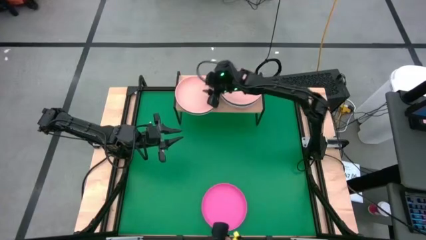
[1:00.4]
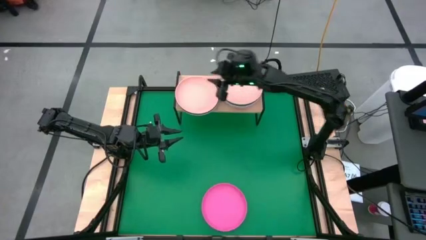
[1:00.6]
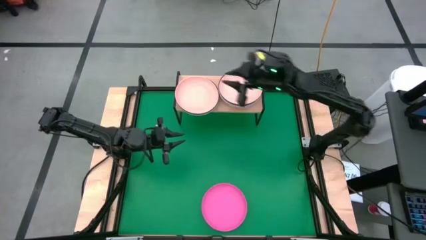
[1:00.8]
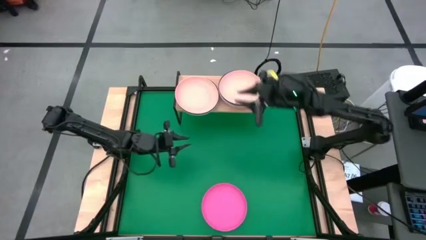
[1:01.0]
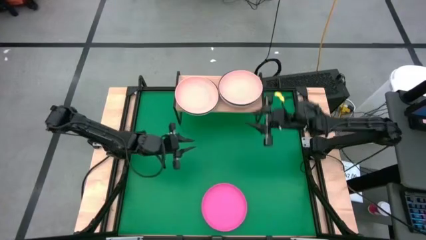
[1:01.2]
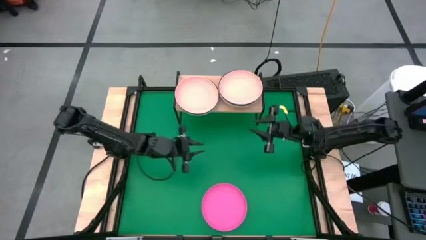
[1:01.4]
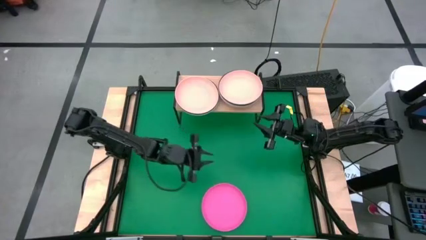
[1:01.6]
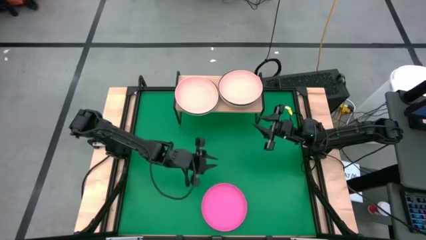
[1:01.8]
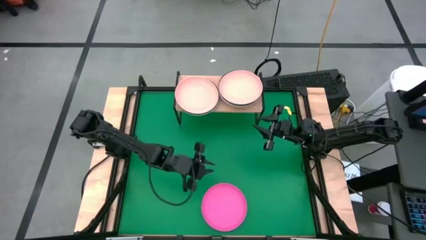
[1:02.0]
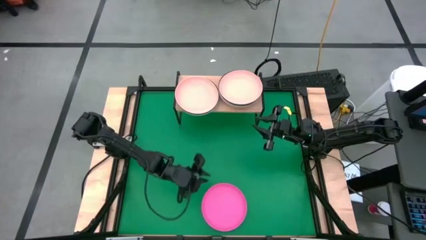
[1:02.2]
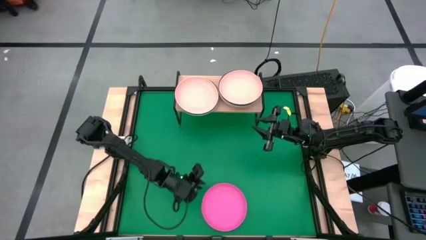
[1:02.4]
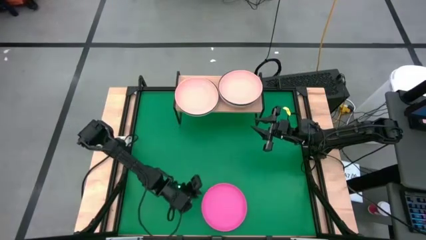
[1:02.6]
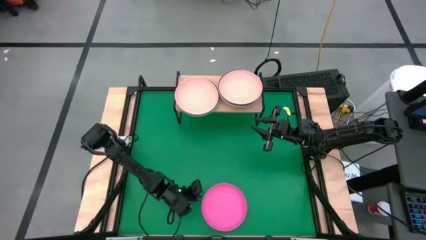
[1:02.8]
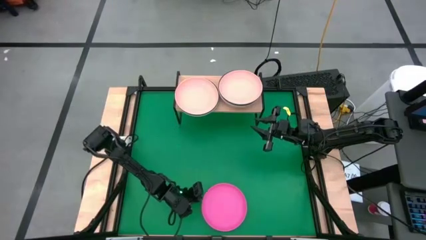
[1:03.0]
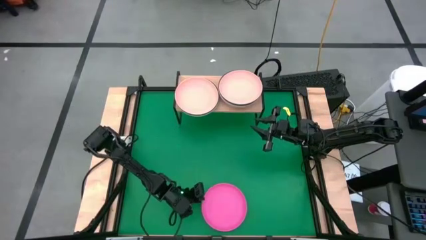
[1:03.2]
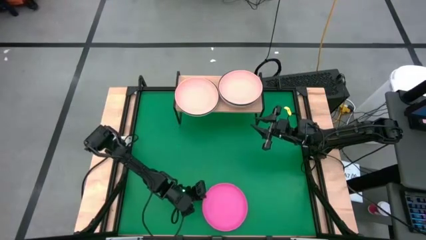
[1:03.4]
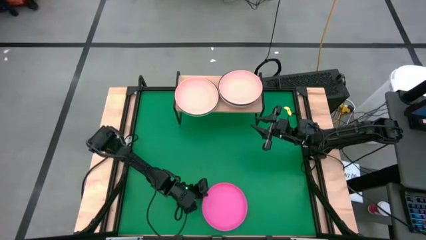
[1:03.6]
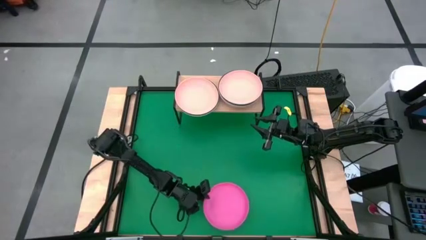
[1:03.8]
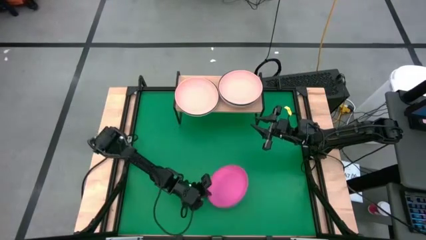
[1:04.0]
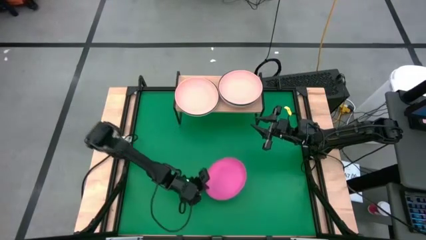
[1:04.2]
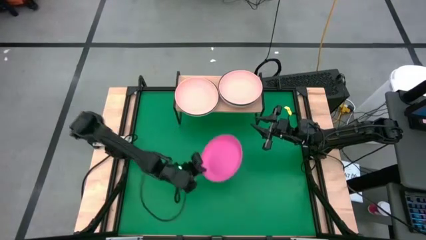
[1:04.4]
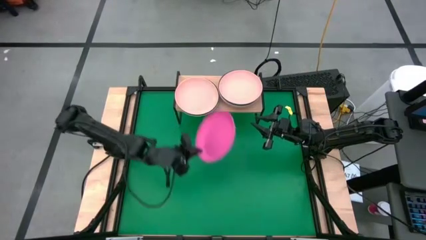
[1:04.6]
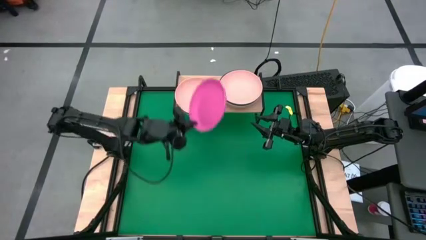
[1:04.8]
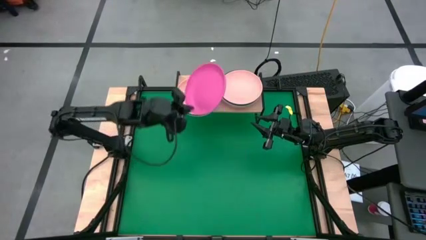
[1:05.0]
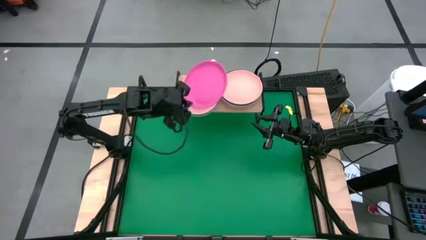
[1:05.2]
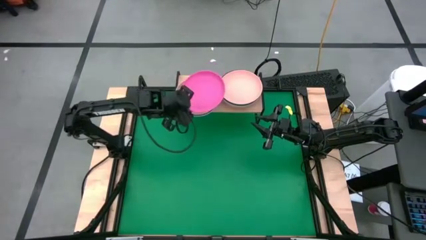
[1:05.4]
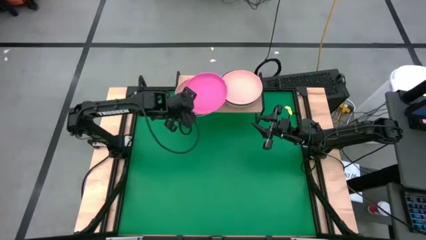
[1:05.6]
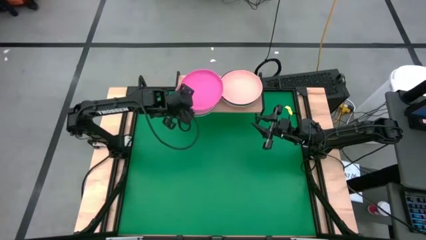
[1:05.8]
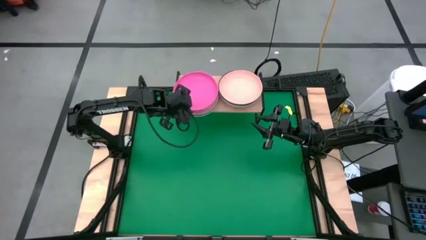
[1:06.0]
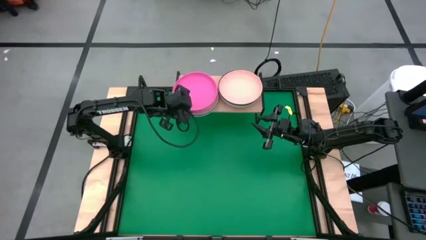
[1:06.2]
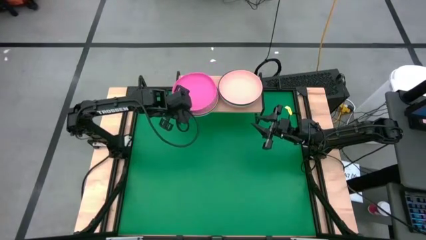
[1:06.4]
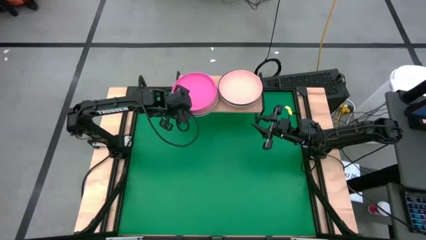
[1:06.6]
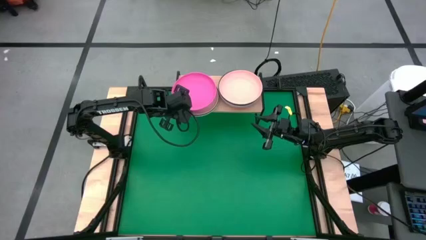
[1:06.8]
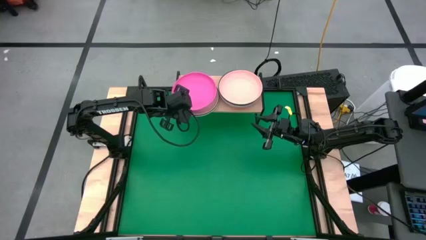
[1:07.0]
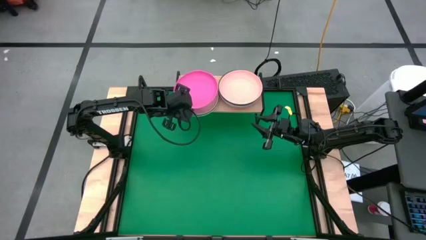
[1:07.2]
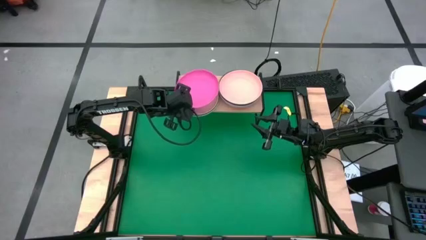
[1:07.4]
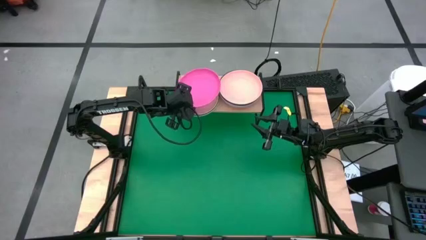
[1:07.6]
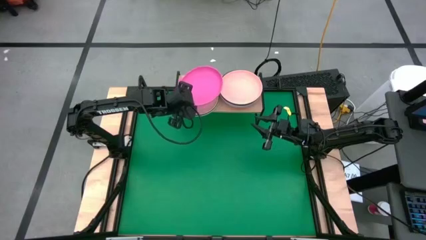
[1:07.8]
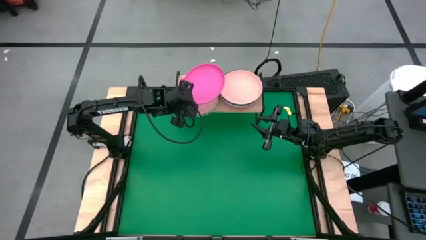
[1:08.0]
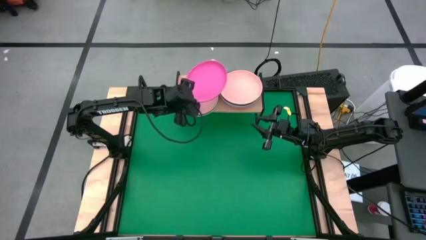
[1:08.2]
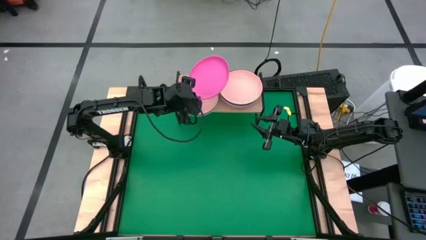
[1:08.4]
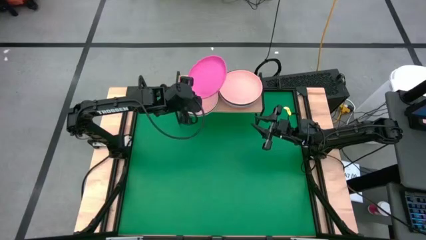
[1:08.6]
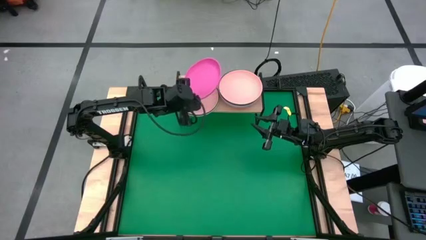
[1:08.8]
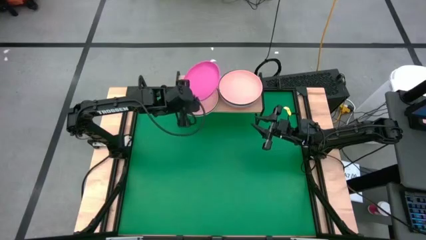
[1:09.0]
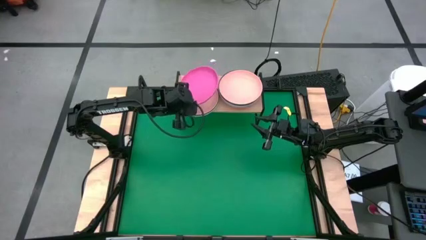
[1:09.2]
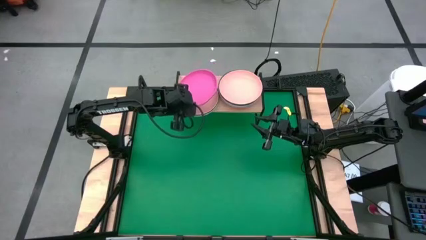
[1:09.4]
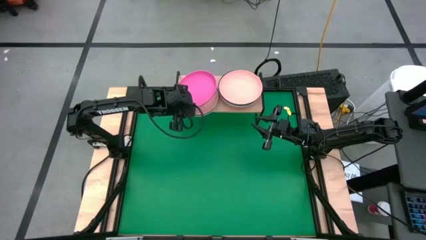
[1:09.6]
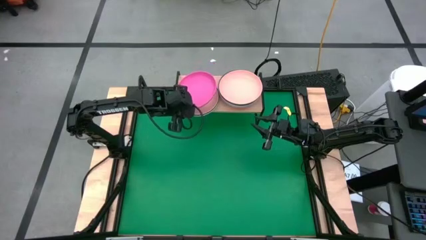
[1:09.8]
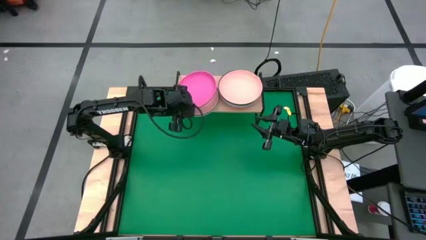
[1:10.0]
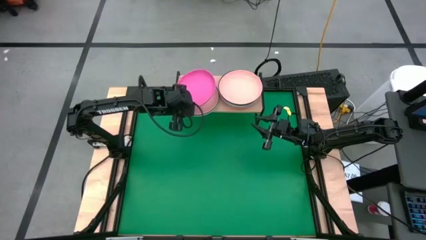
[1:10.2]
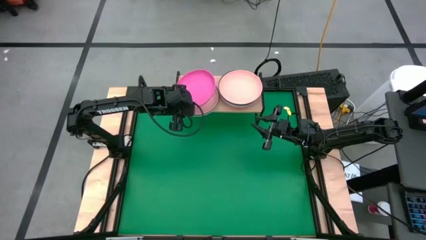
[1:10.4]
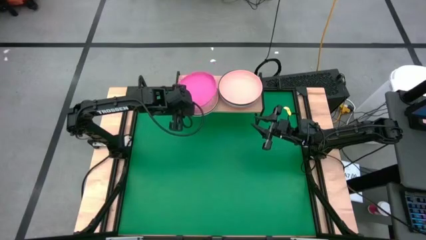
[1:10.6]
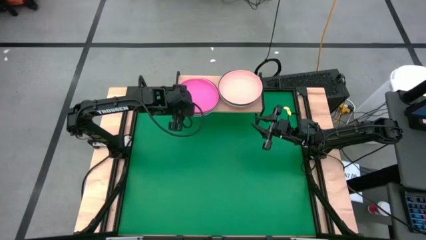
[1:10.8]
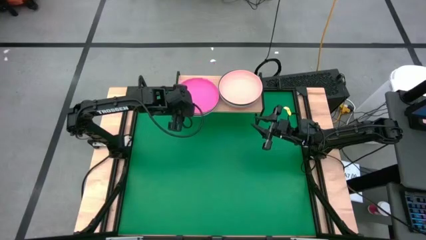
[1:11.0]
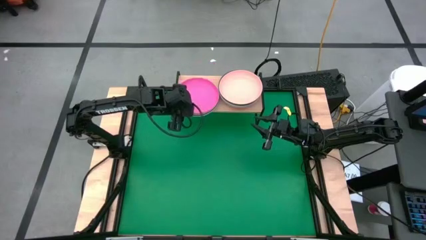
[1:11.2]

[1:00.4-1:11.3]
Task: Place and stack plates onto a shelf
Stack the pink plate on the left beige plate
